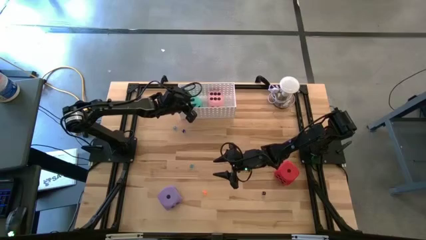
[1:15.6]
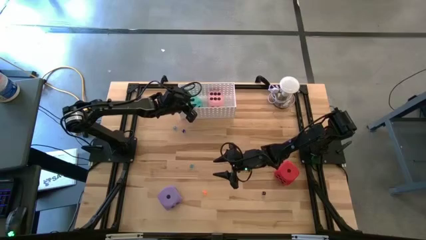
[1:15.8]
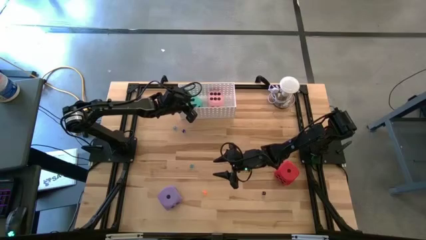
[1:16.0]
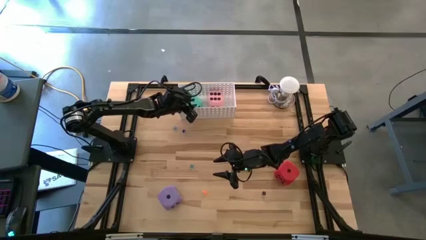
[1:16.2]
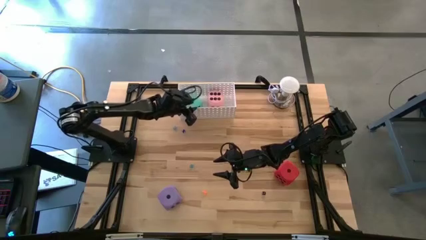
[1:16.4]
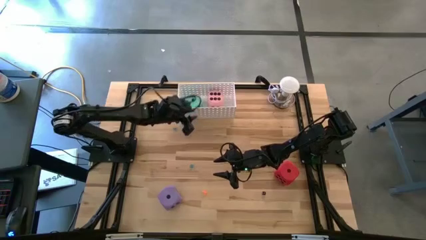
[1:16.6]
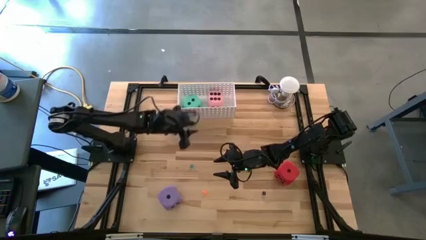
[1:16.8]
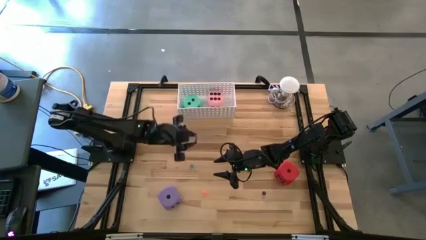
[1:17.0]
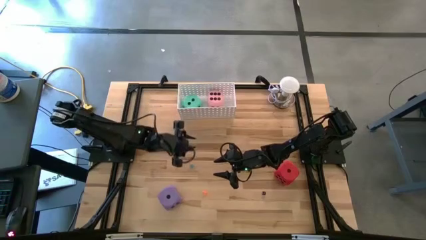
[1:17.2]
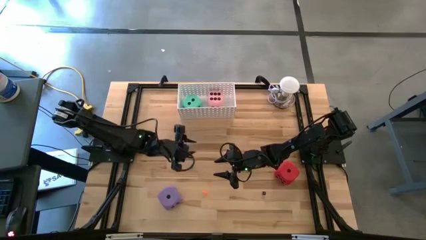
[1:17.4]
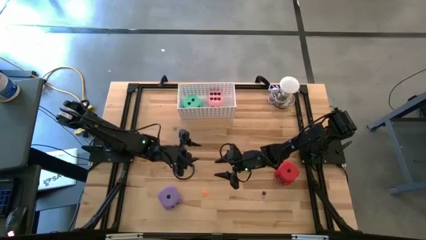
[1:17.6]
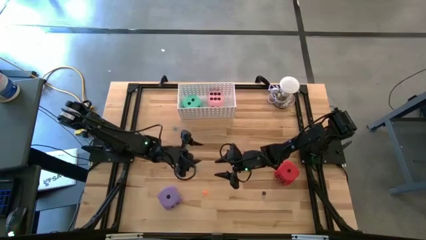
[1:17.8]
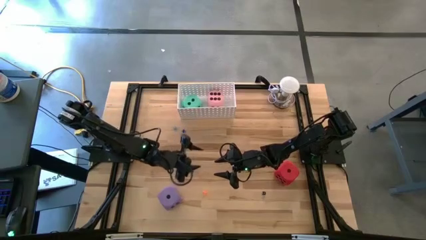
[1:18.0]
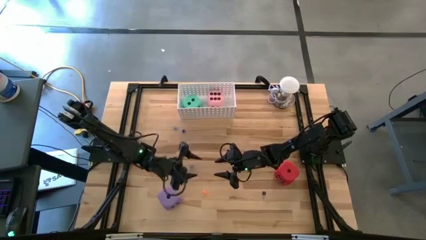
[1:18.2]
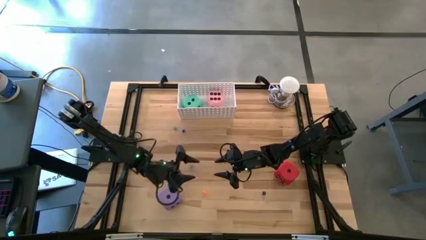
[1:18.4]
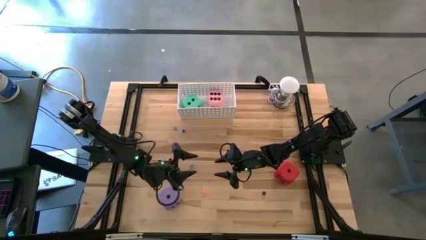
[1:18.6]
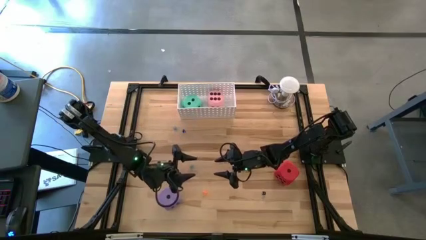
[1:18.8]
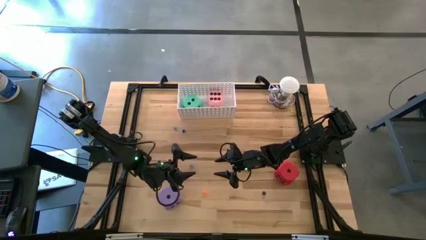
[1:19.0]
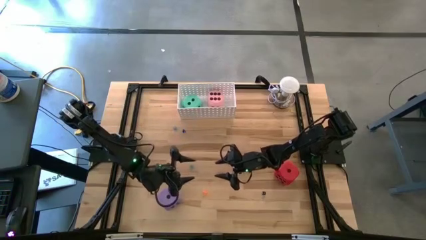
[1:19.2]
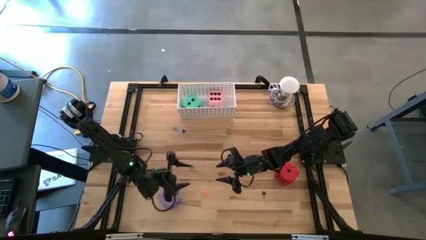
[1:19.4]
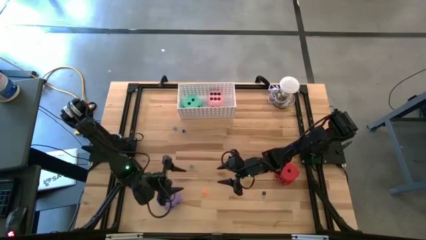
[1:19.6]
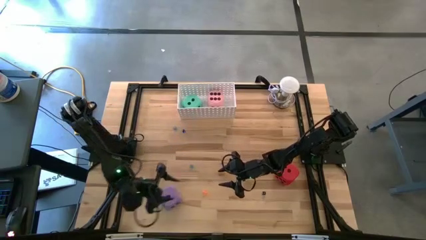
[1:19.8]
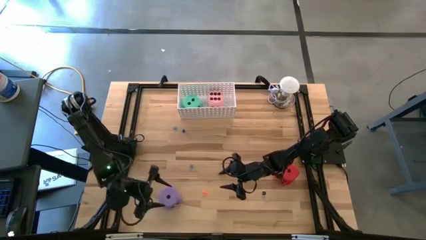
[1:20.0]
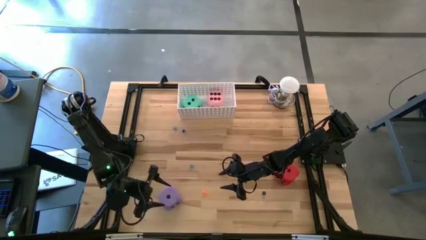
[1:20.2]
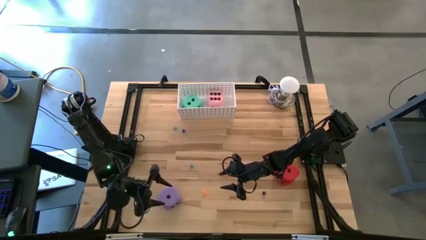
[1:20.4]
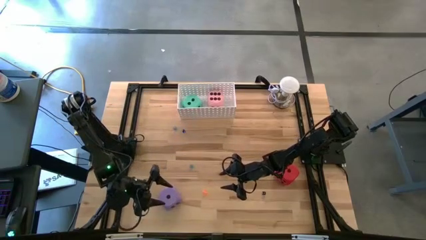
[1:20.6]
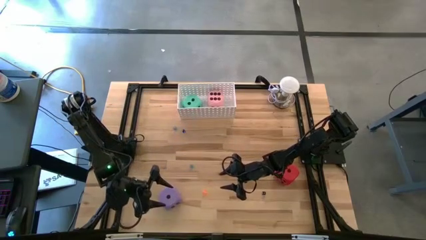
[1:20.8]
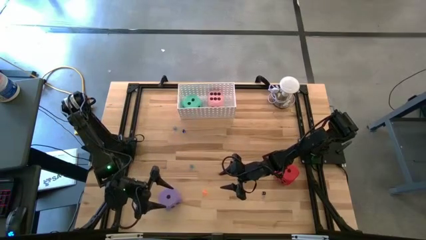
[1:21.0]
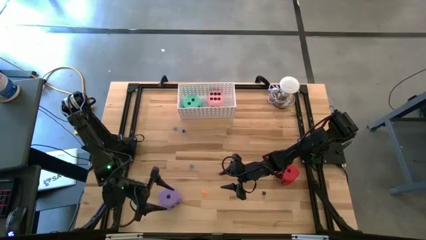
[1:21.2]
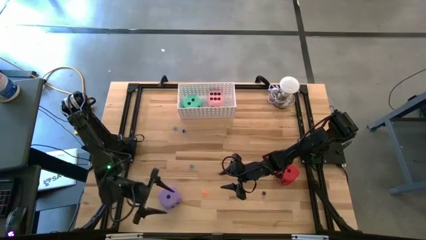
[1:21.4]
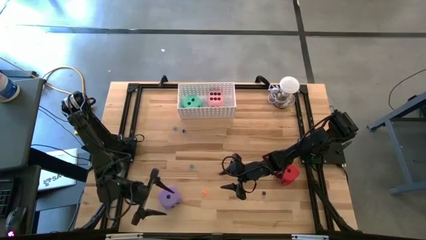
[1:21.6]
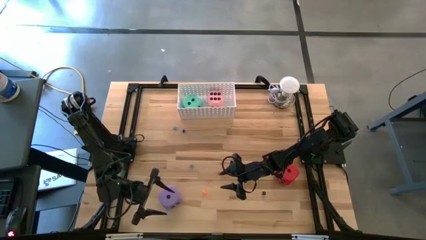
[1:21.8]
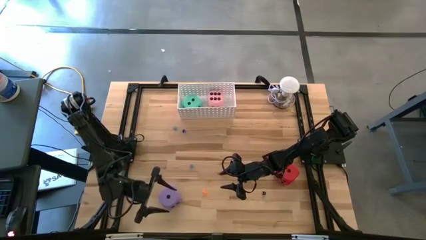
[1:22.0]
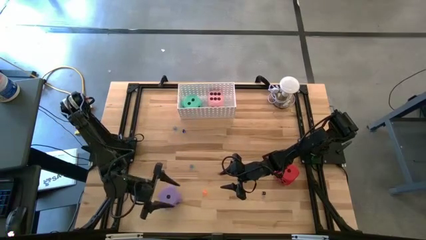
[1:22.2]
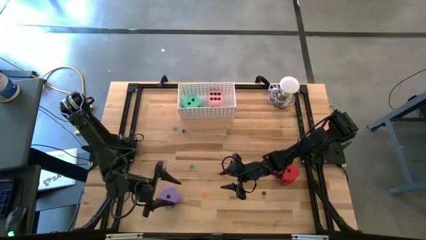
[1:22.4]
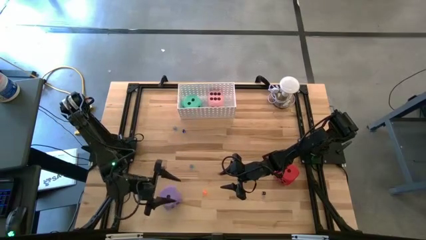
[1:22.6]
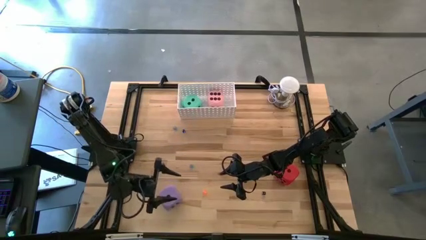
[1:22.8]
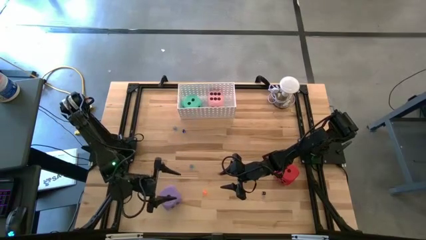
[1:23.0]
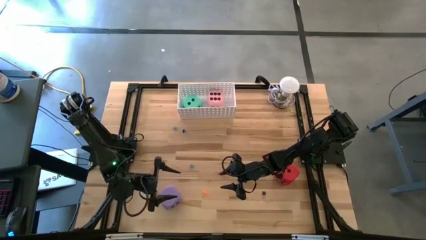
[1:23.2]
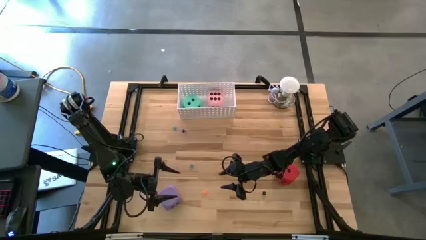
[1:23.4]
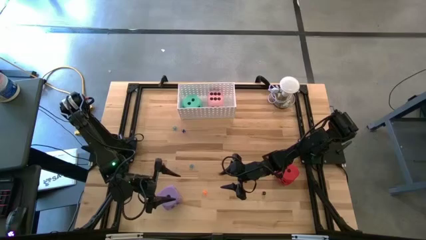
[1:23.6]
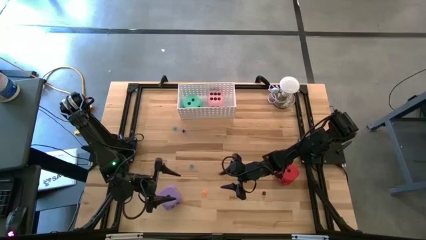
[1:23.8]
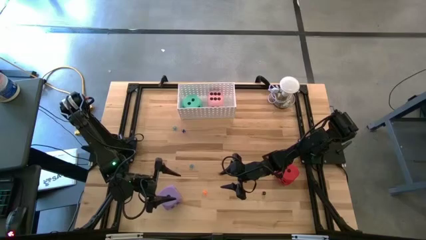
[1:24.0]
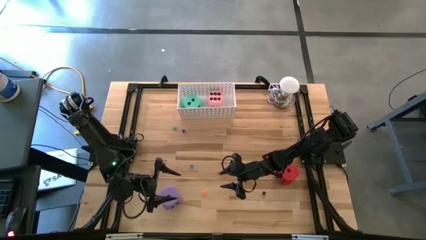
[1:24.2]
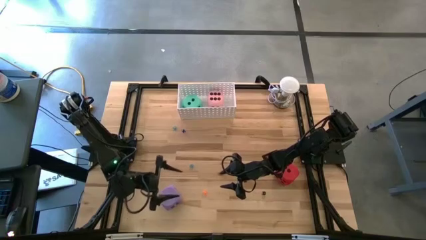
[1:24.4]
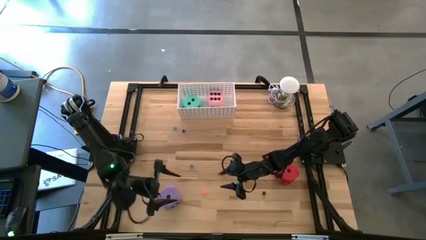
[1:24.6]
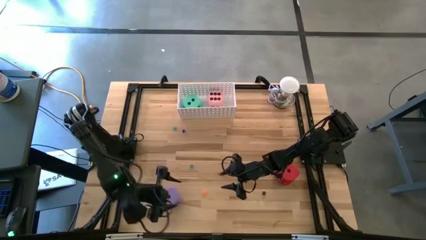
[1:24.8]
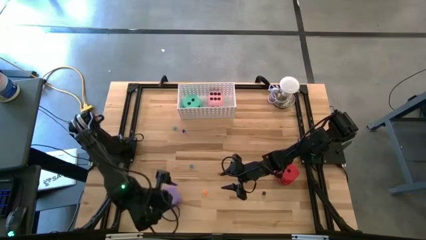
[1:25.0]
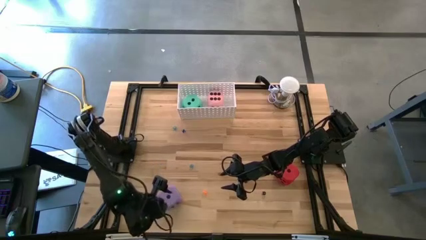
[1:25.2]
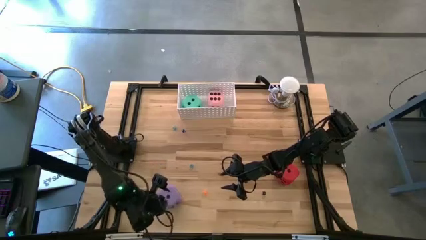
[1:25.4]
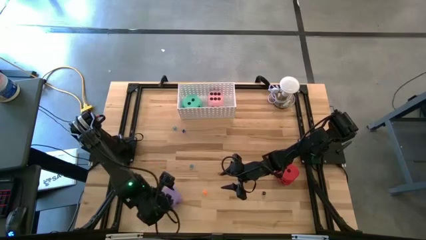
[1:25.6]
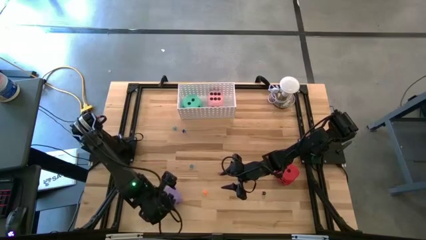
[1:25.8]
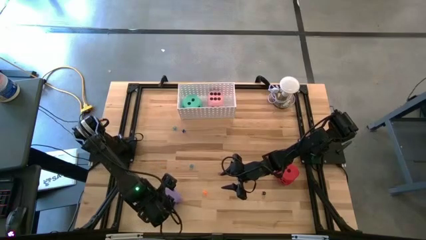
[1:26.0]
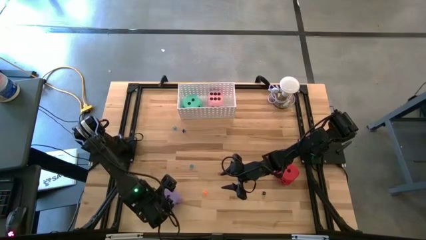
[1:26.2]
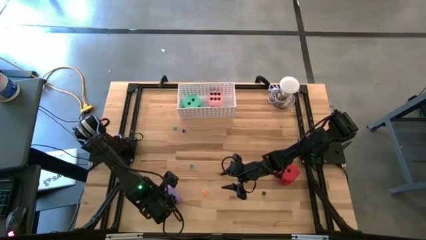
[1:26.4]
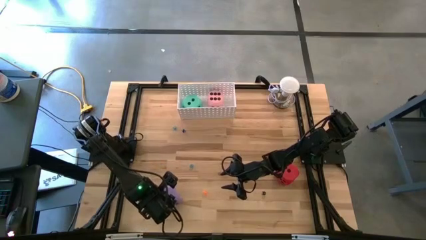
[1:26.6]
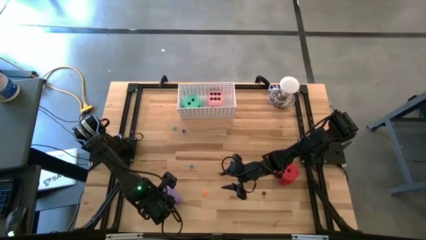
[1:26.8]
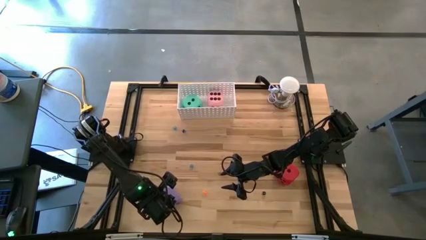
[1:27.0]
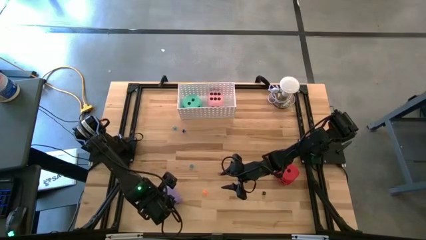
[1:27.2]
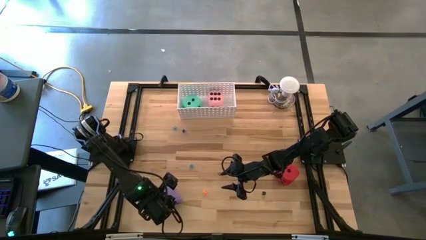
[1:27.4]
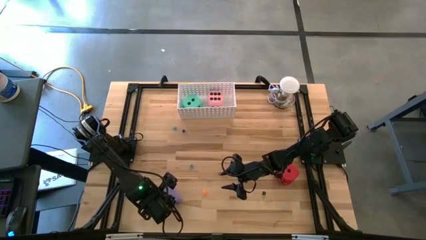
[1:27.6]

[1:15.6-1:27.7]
Task: Pick & Place Dice
Put the large violet dice into the white basket

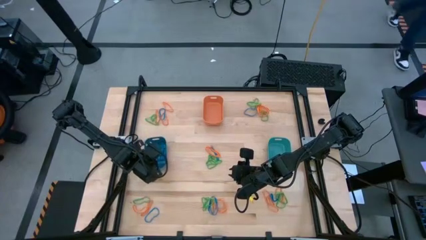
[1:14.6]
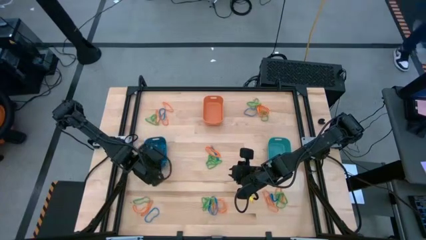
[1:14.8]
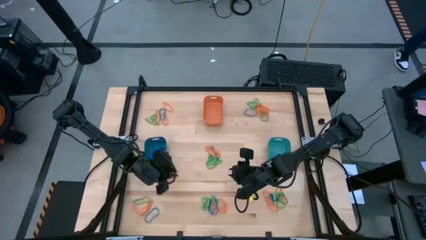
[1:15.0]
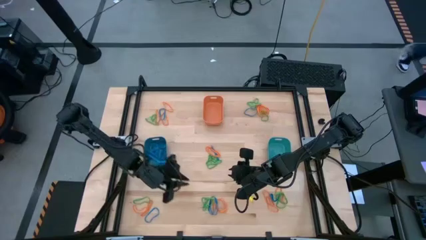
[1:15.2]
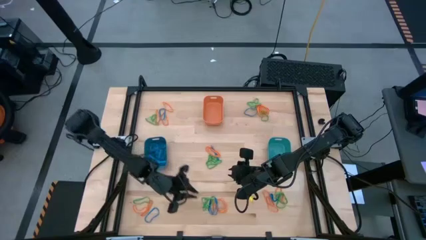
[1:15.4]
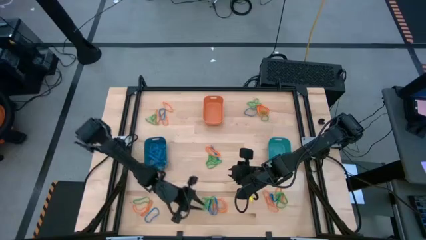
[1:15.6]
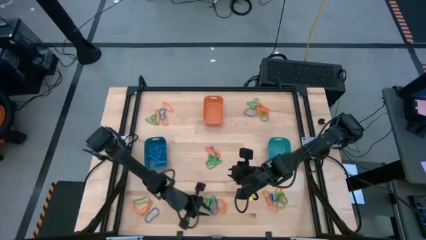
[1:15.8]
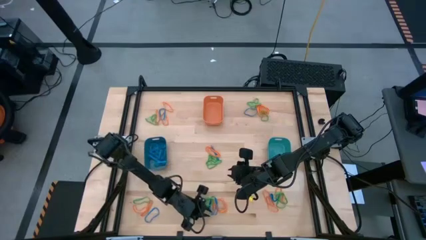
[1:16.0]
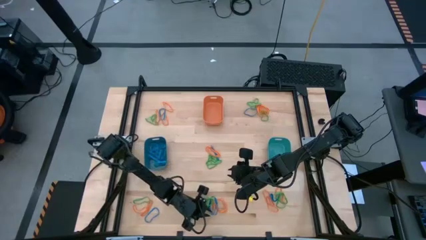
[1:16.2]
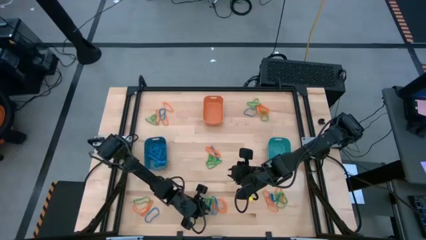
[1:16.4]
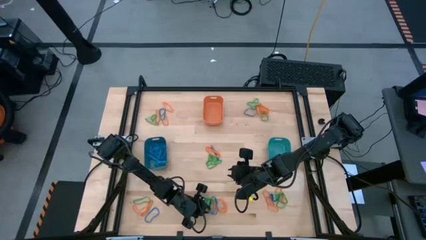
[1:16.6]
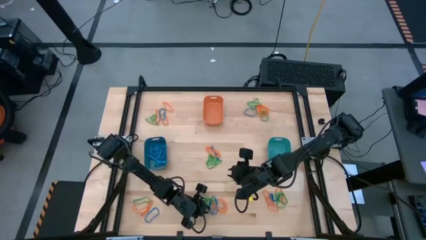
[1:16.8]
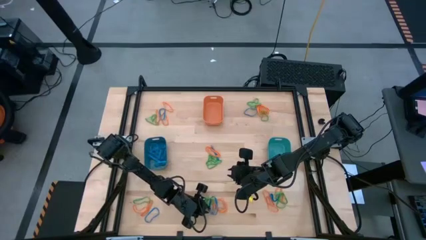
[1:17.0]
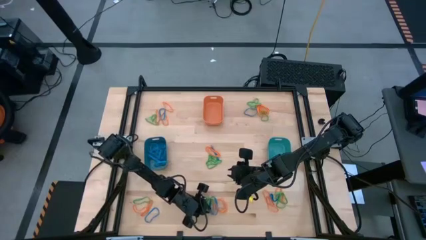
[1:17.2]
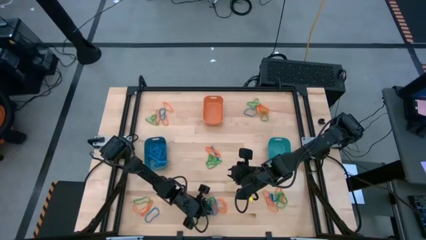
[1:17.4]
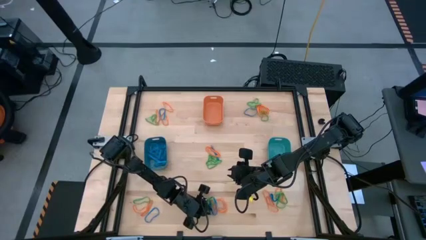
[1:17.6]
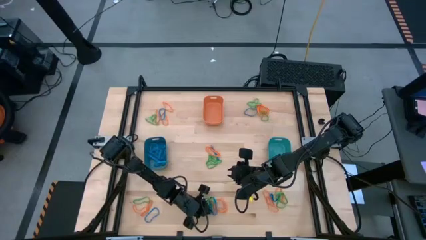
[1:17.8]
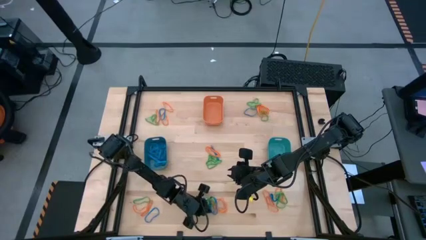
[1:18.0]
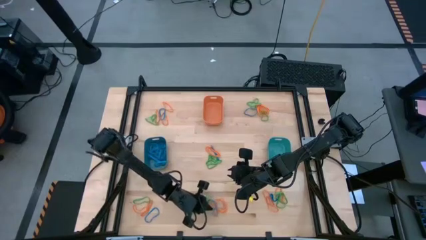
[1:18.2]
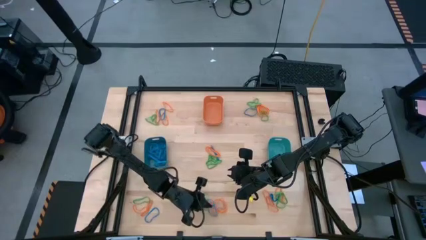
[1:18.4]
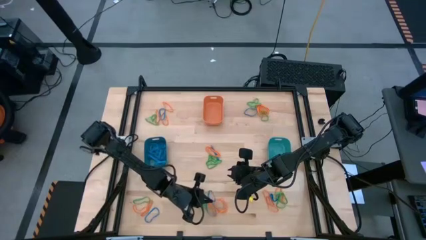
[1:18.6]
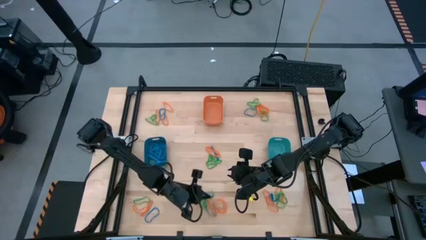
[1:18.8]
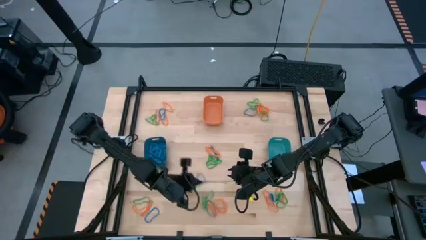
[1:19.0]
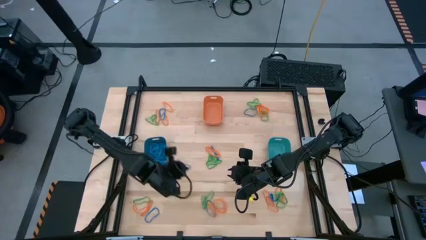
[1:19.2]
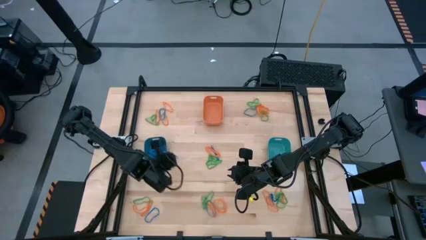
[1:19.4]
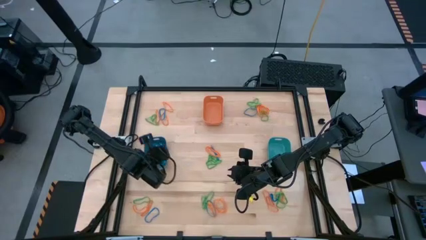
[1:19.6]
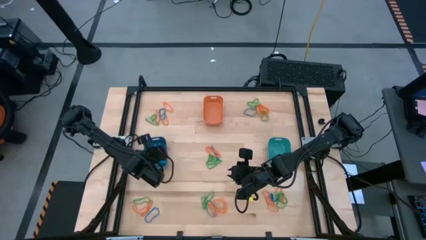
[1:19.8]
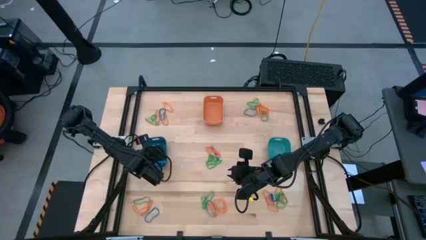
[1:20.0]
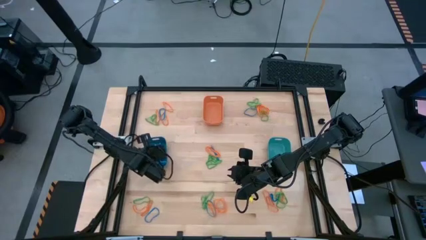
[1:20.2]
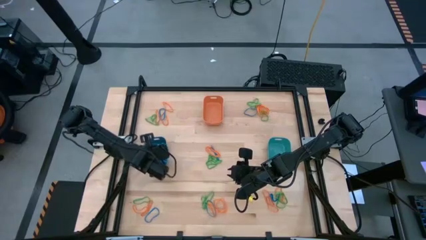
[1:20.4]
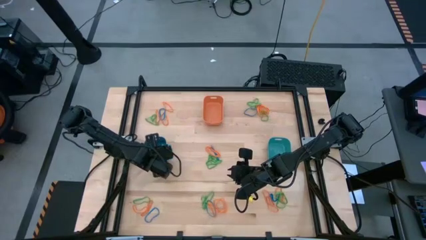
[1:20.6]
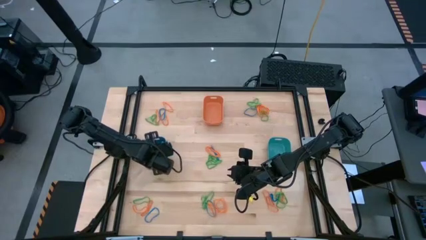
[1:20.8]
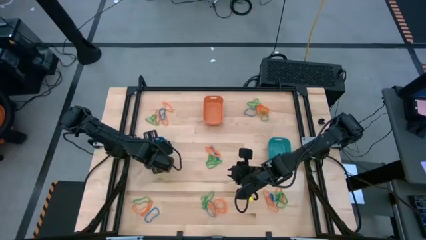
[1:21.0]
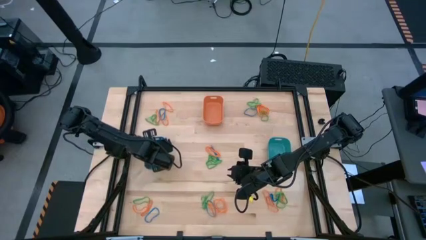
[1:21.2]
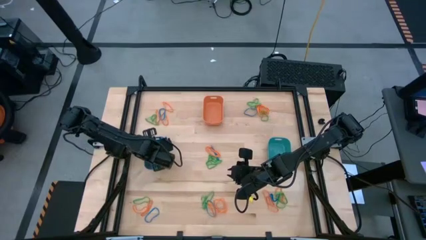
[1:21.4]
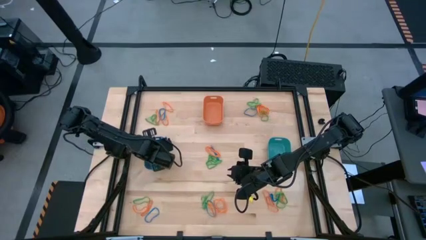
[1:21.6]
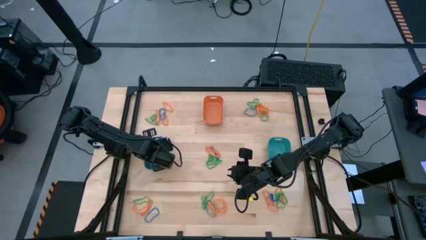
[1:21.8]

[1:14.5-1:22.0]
Task: Sort rubber bands into baskets
Put the blue rubber band into the blue bin
